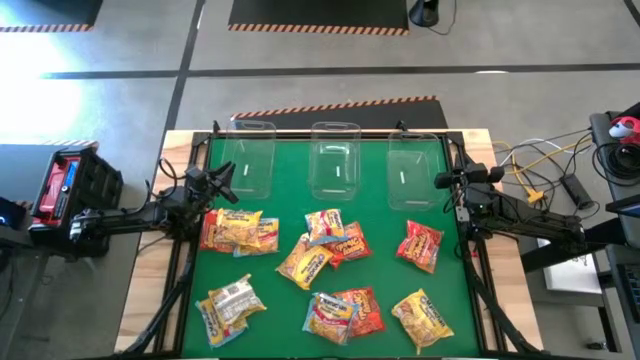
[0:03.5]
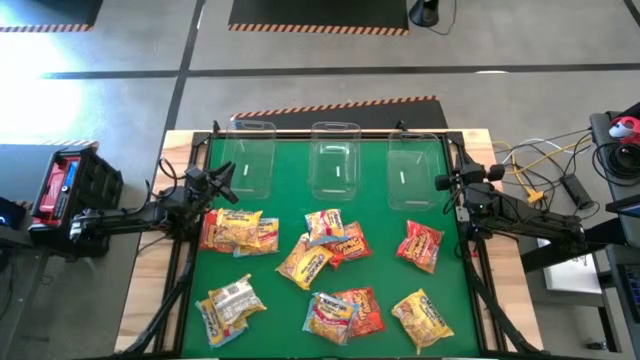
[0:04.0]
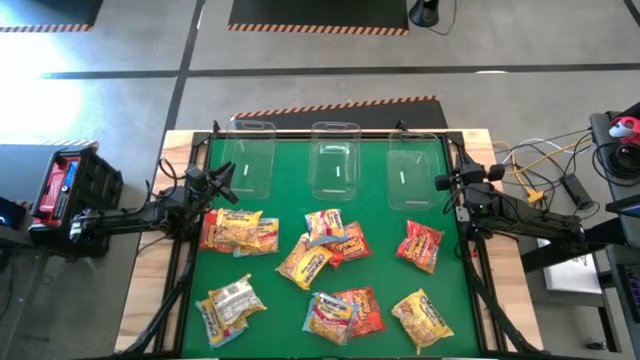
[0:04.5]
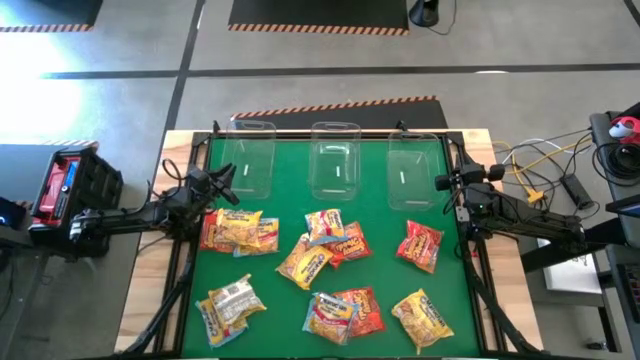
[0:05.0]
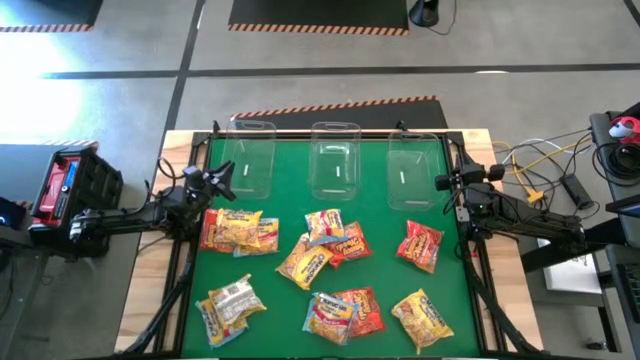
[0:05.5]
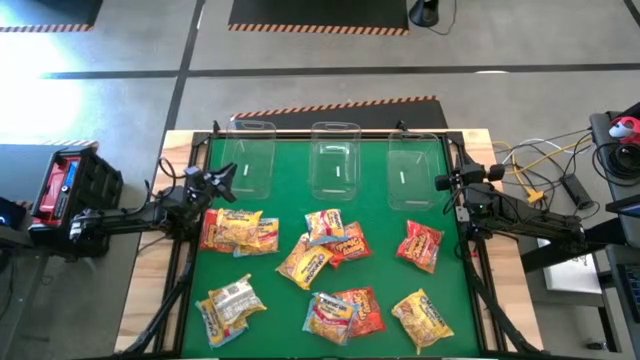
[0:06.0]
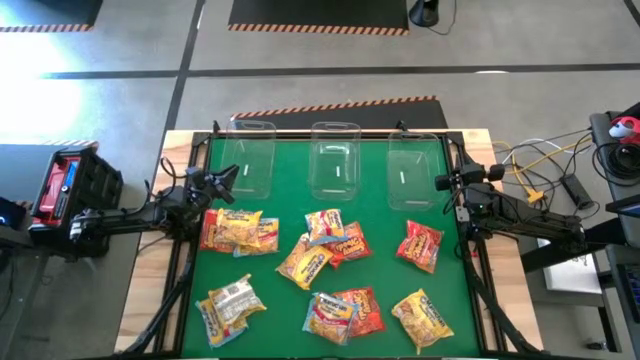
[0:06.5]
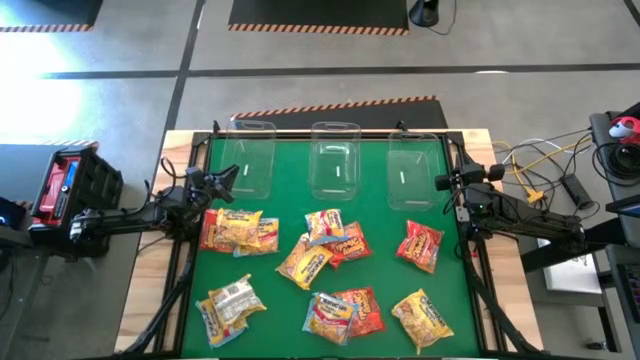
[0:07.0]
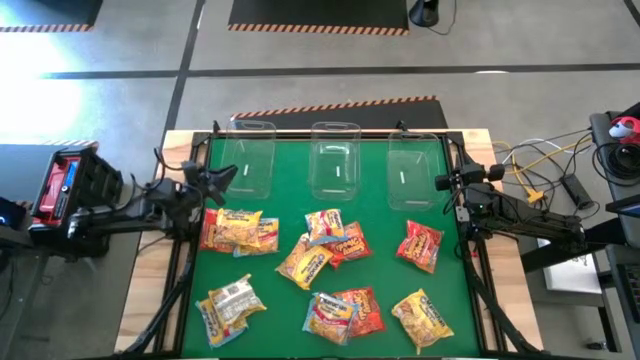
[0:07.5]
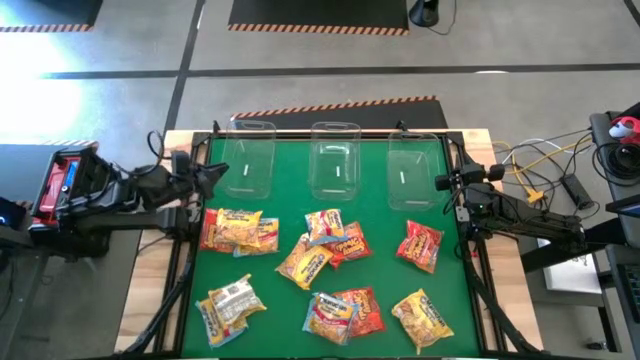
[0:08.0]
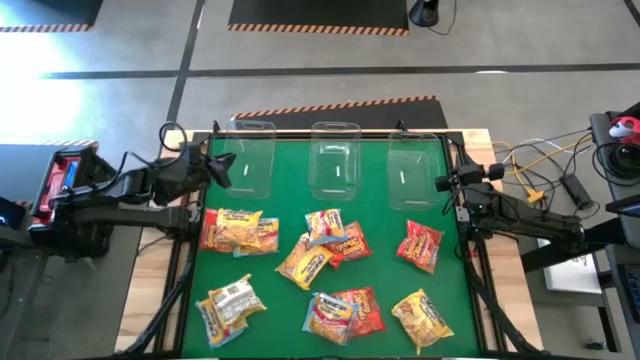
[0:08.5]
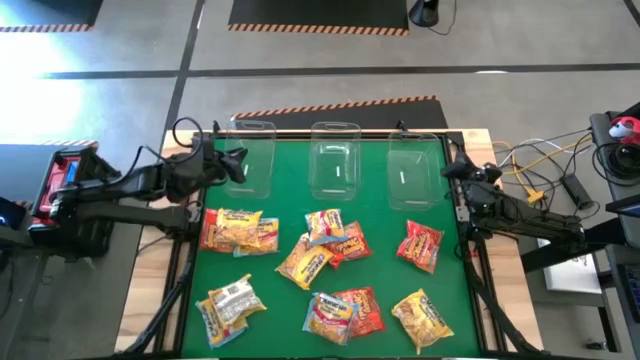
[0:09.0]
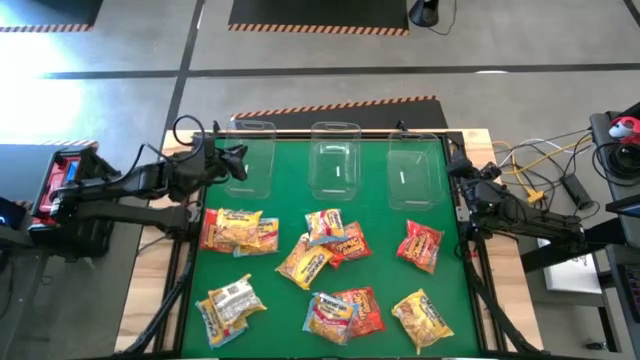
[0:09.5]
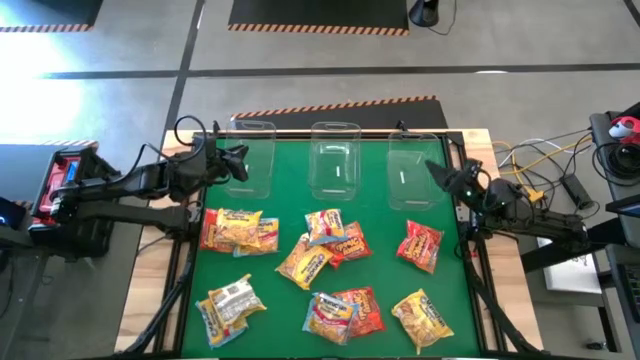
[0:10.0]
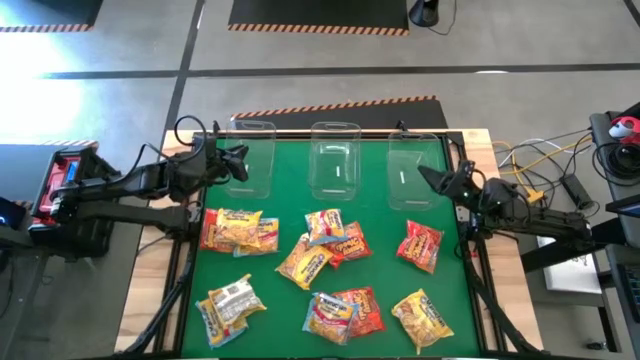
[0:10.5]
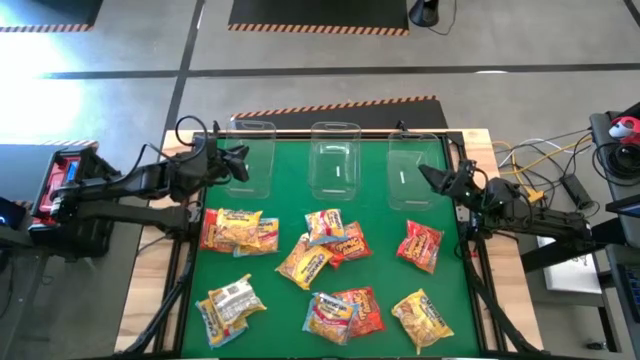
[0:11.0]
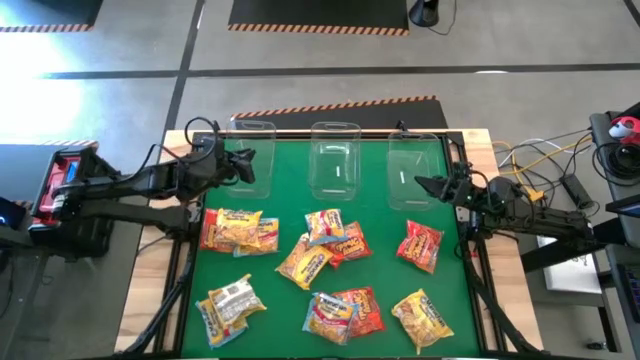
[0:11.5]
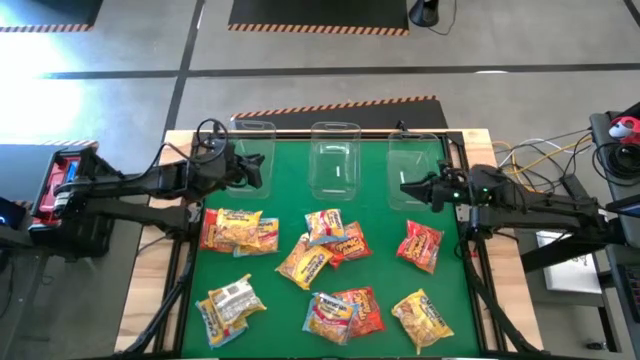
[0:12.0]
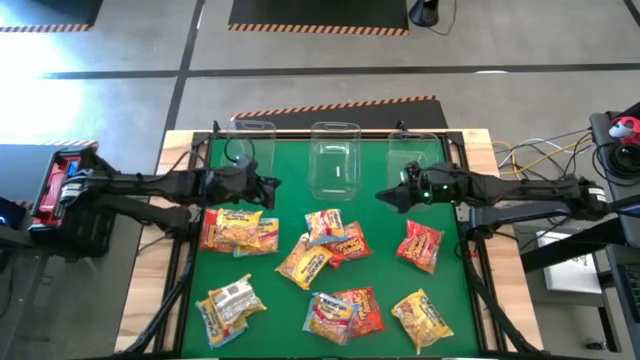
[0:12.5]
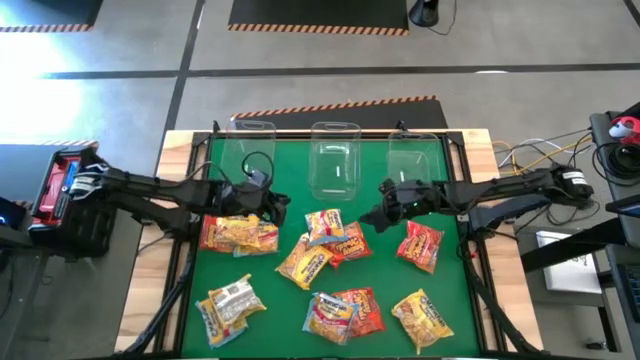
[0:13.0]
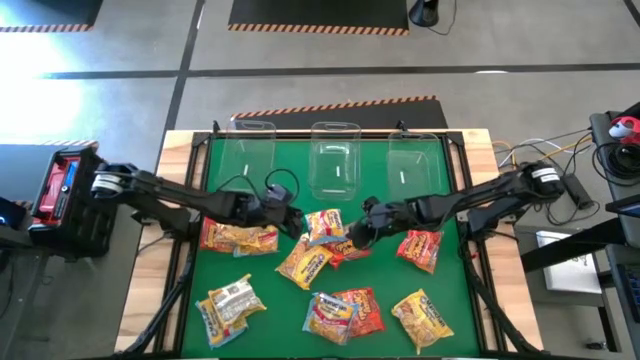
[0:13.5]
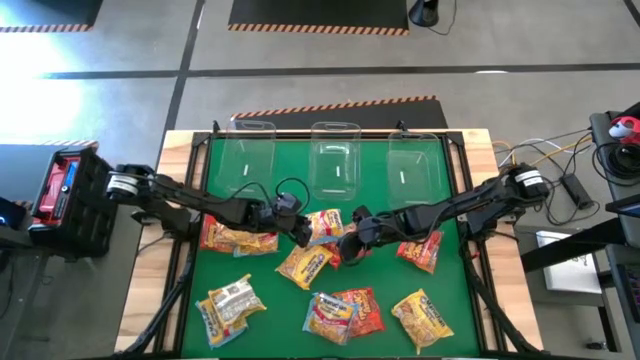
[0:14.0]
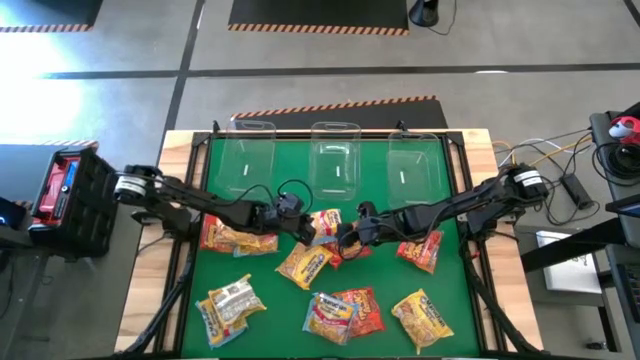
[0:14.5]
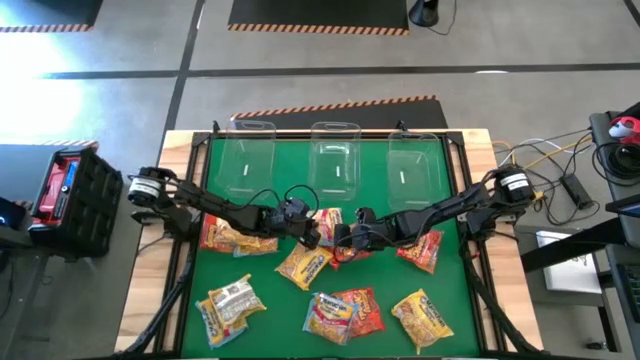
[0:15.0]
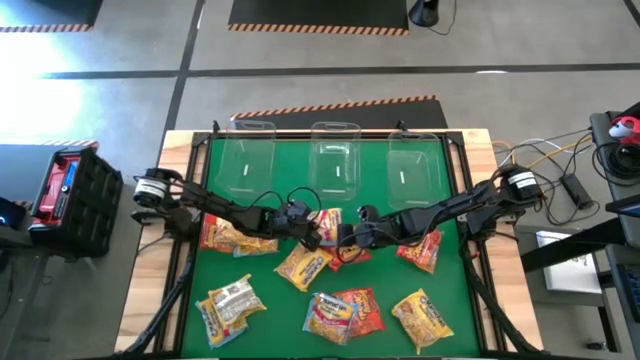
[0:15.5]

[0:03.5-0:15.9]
Task: Sort Maruchan noodles
Put the blue noodle pack into the right transparent bin

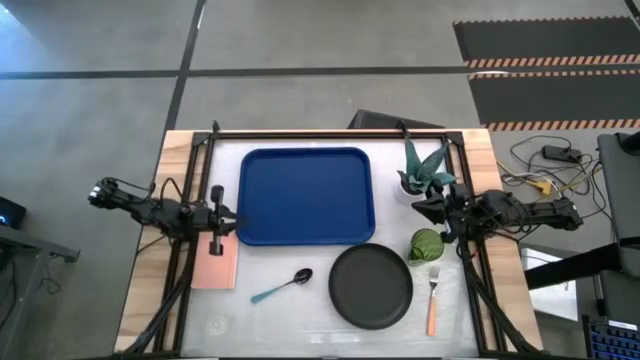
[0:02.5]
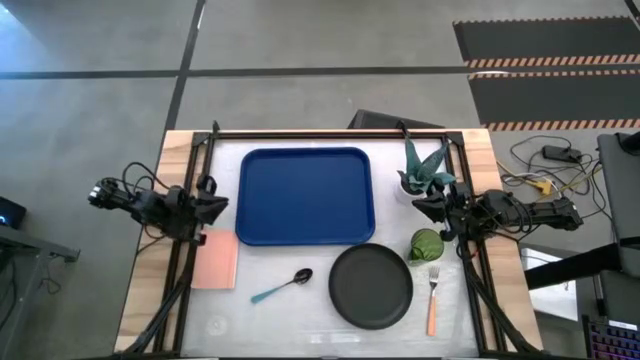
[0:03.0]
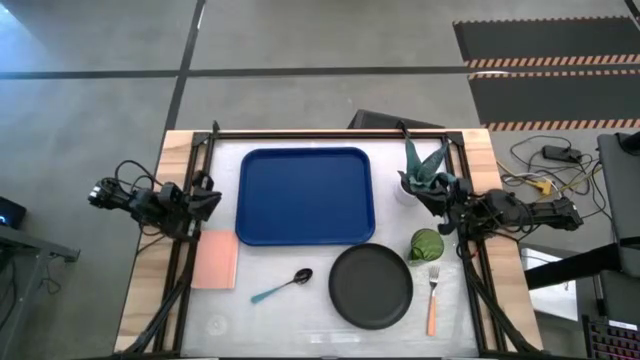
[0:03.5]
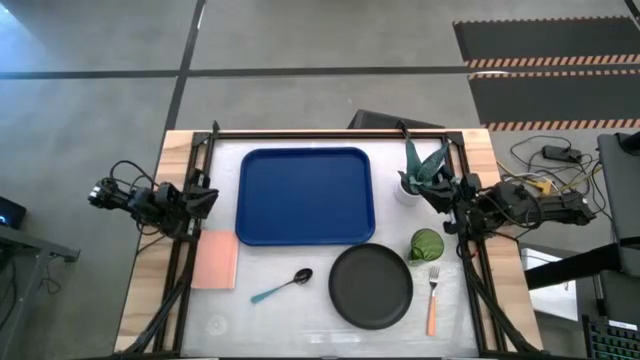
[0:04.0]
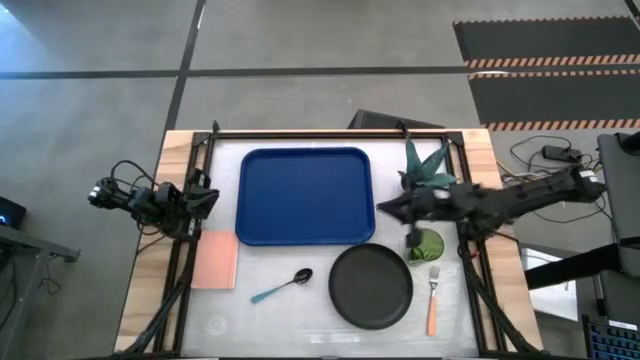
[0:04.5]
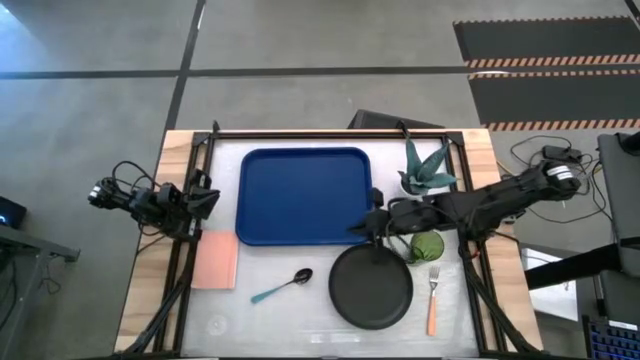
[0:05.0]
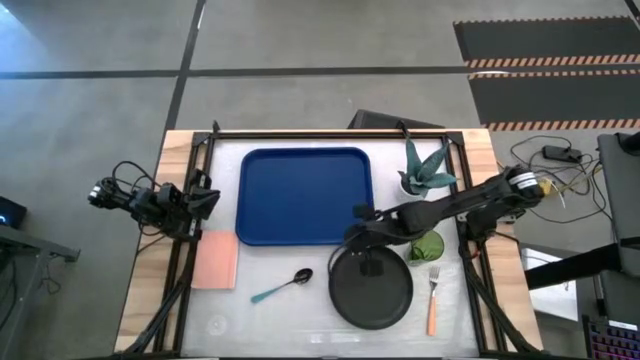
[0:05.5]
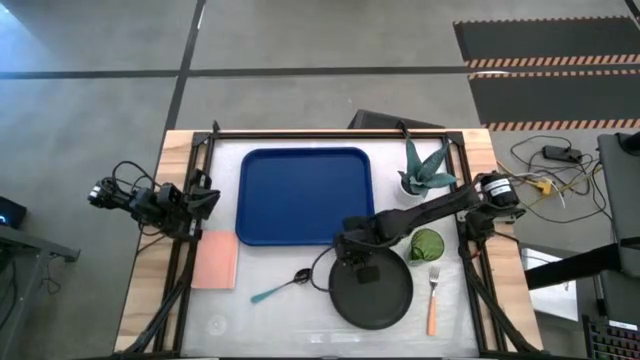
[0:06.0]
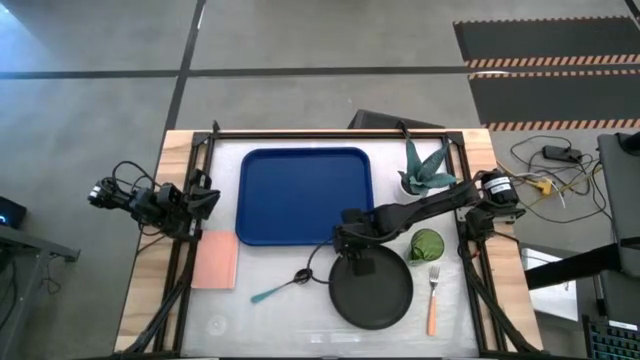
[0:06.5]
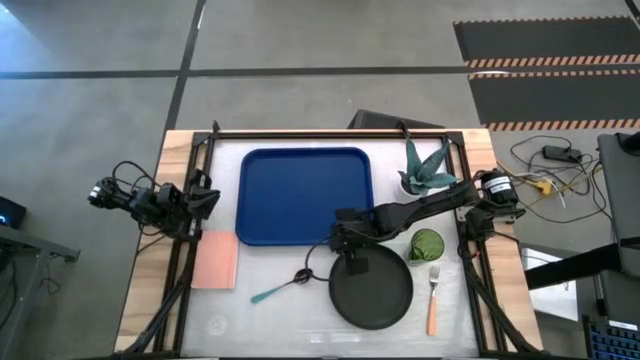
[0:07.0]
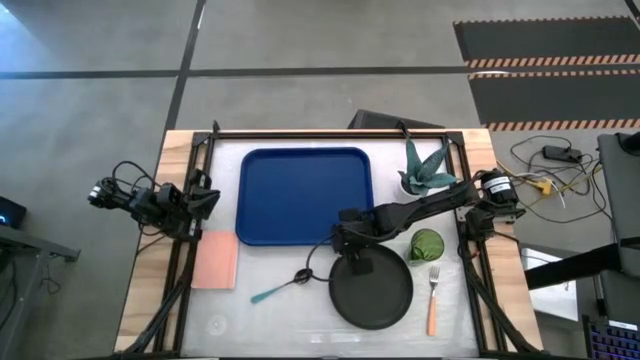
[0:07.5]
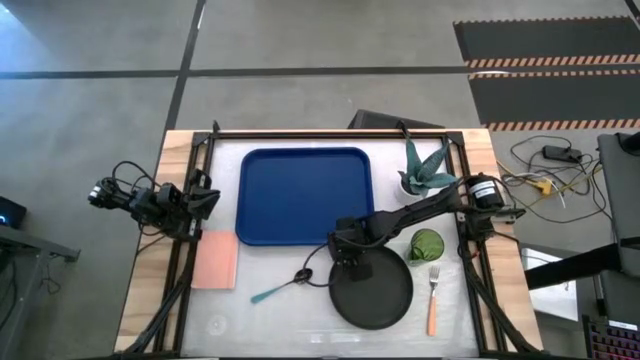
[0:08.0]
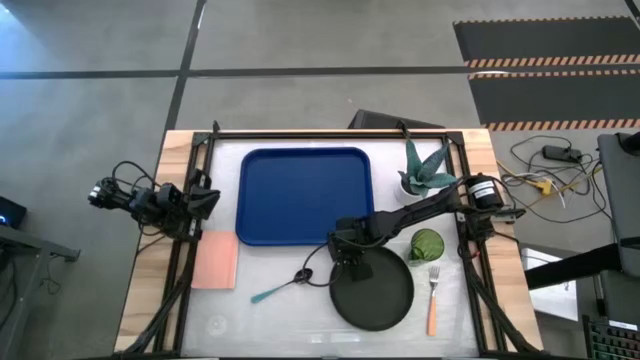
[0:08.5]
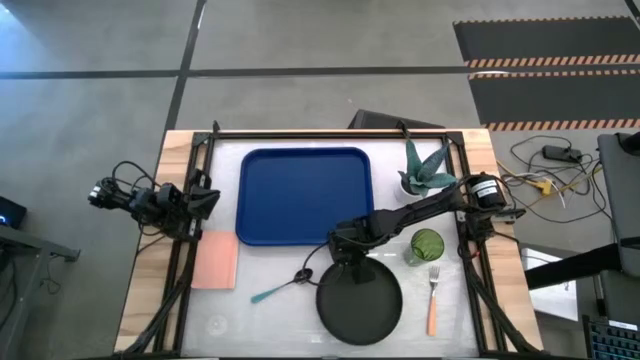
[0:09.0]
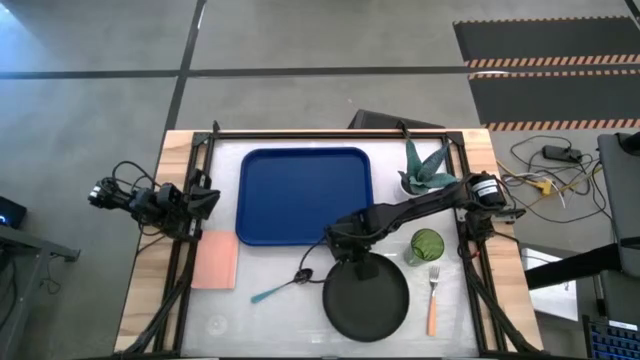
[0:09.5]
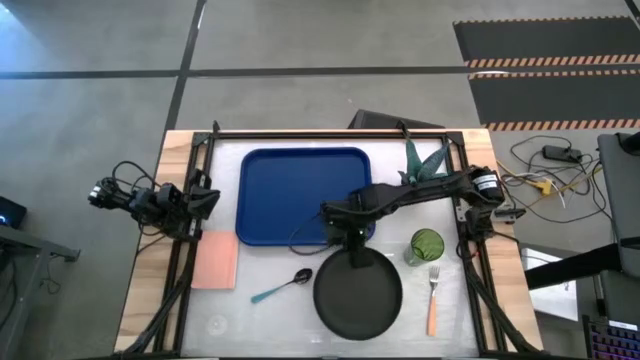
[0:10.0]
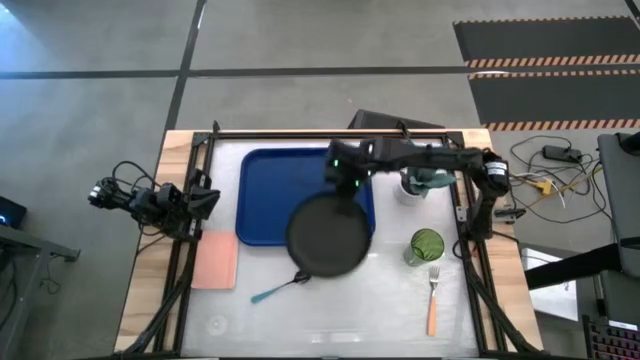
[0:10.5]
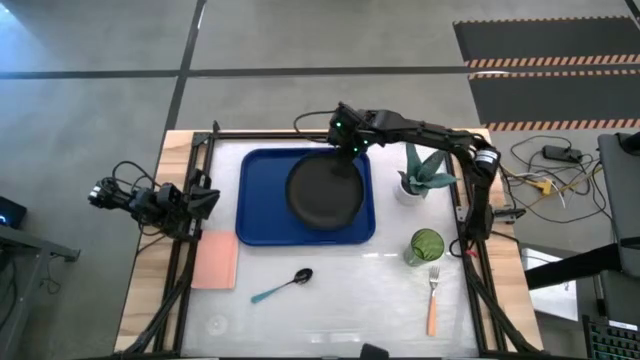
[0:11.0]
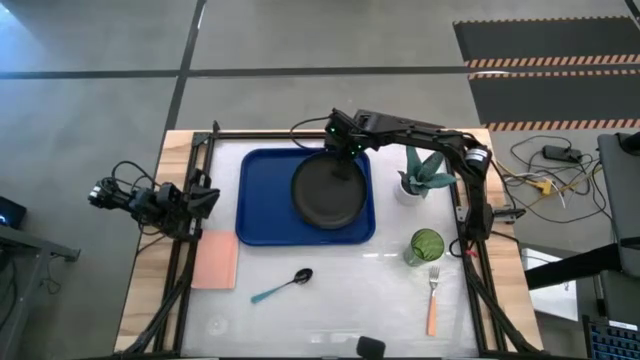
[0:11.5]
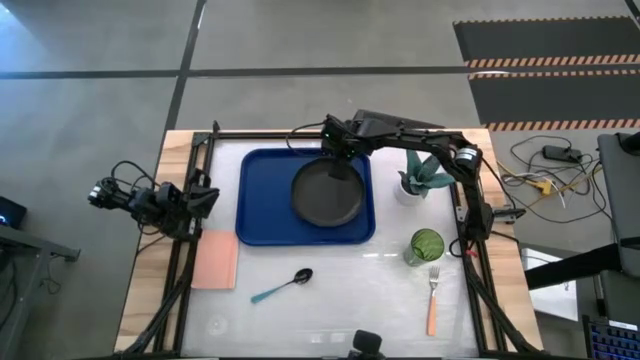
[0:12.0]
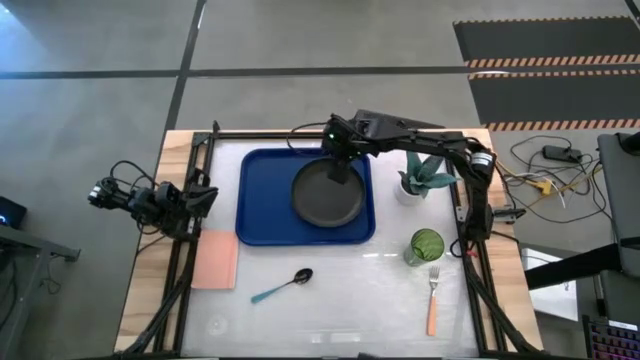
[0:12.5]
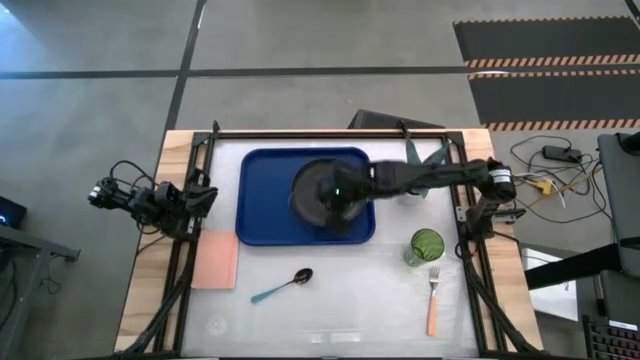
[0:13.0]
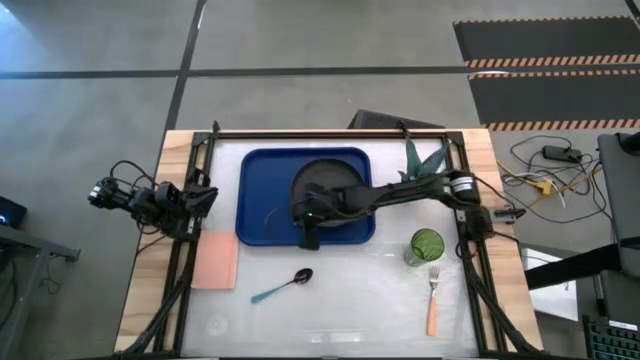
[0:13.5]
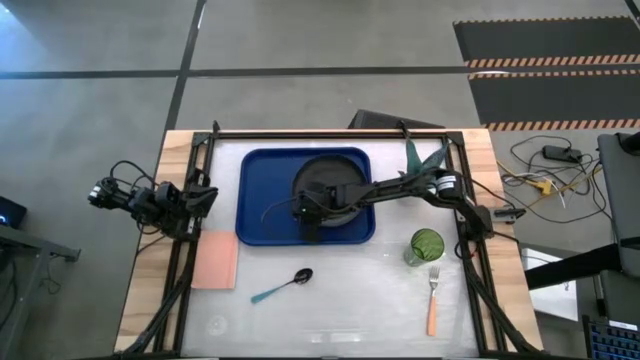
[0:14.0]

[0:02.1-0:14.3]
Task: Pick and place plate/cup/fork/spoon on tray
Put the black plate on the blue serving tray
